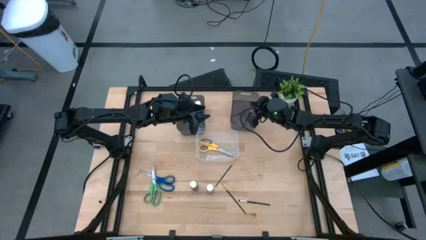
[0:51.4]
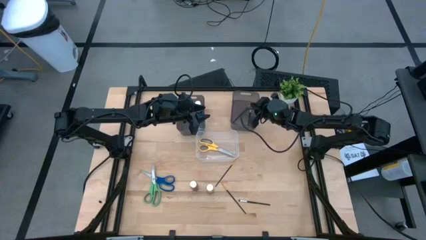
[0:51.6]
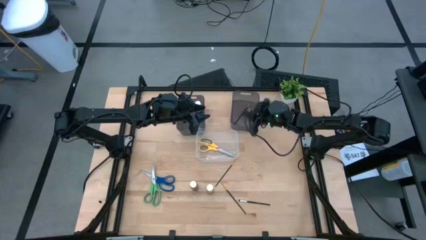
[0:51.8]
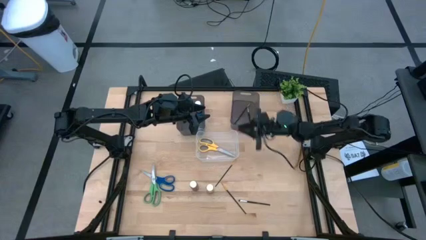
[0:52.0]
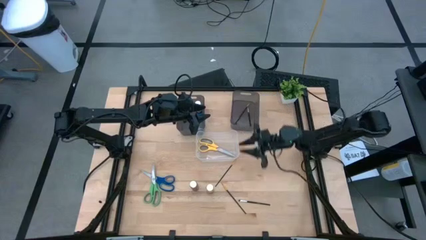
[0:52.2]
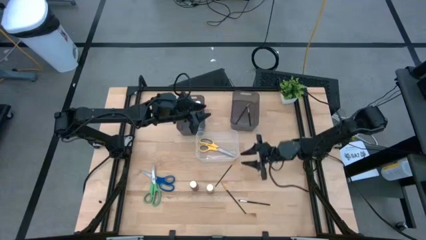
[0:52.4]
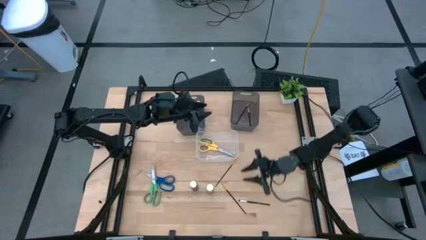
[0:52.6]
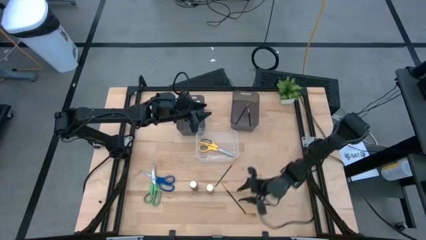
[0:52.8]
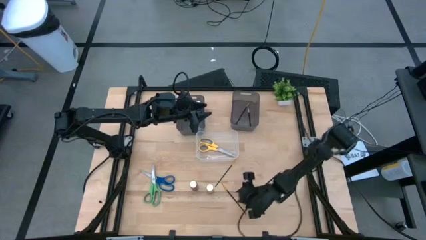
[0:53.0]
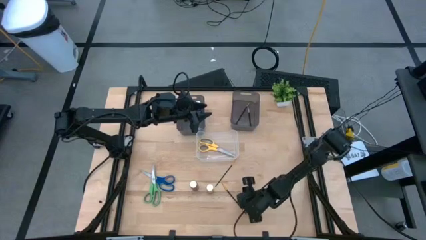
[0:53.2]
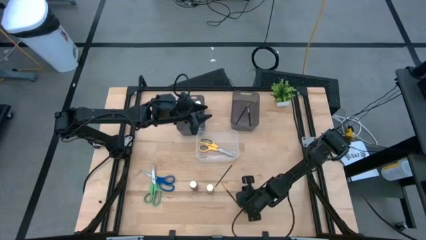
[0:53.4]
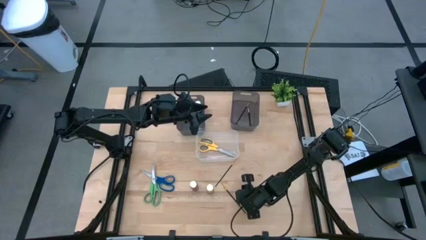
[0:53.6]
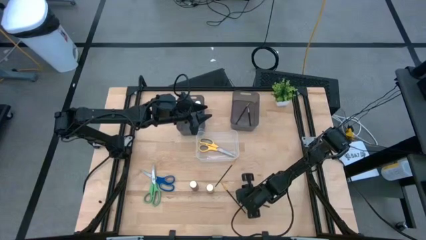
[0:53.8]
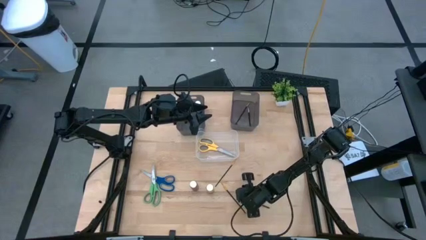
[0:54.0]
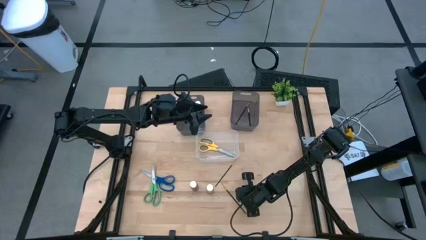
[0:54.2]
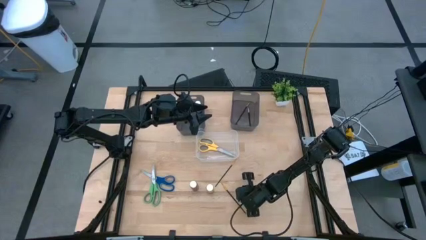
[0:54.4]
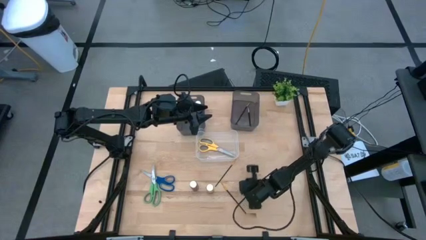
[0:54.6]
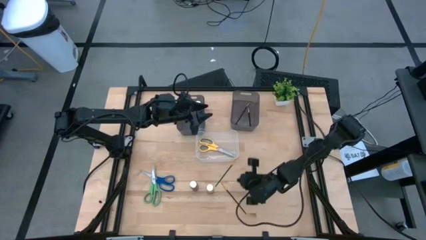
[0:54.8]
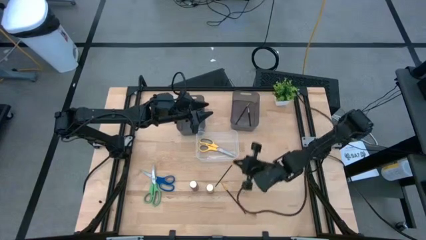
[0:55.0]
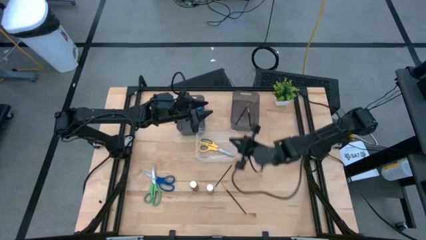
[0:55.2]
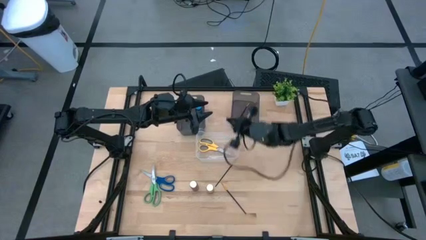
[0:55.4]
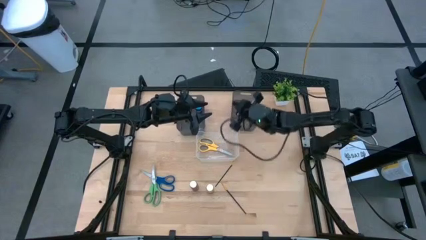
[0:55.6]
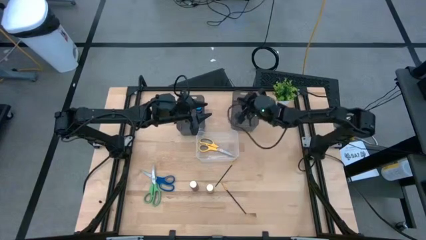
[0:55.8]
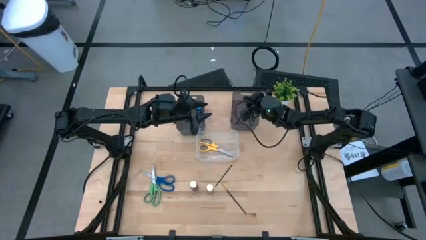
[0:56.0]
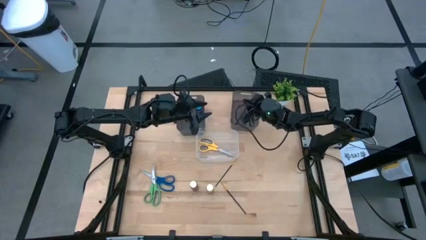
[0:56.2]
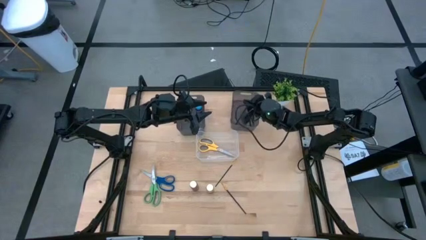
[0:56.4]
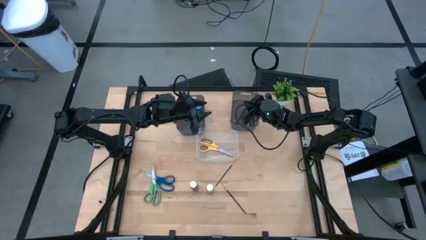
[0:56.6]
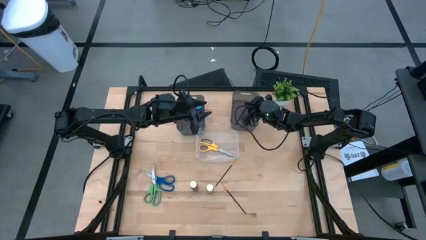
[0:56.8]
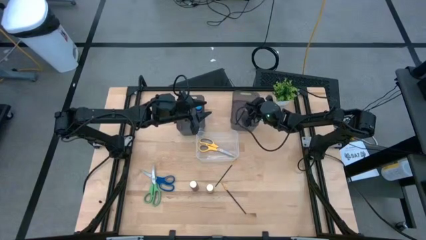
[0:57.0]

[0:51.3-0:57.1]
Task: Pick & Place Paint Supplies
Put the black and silver brush into the right black bin

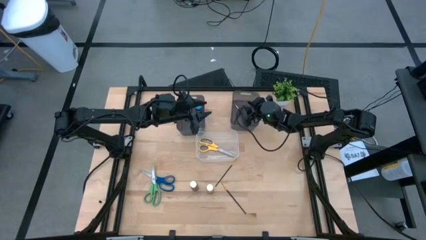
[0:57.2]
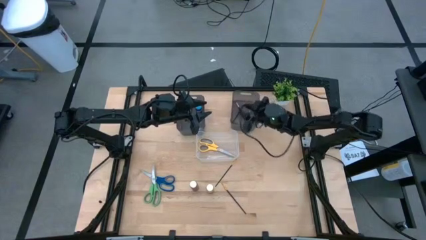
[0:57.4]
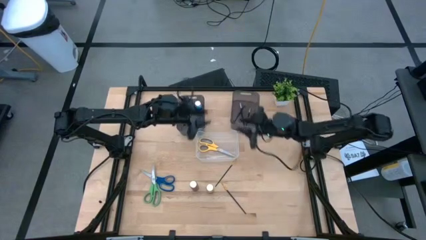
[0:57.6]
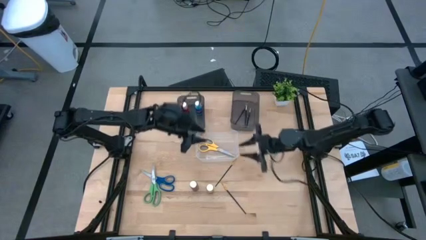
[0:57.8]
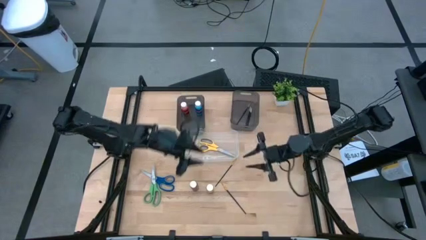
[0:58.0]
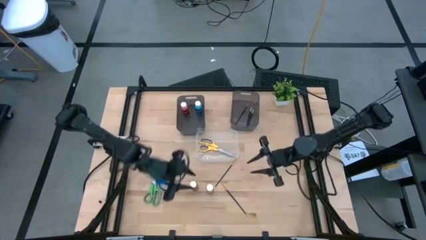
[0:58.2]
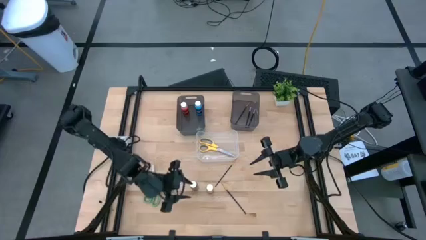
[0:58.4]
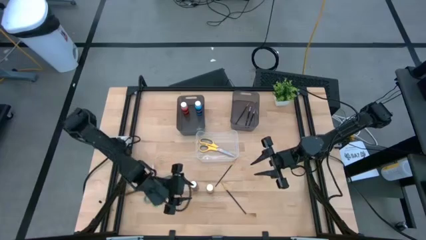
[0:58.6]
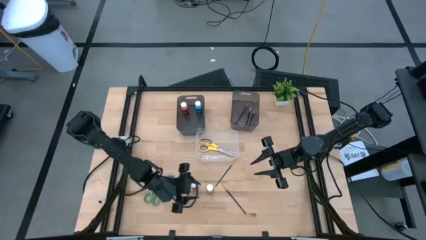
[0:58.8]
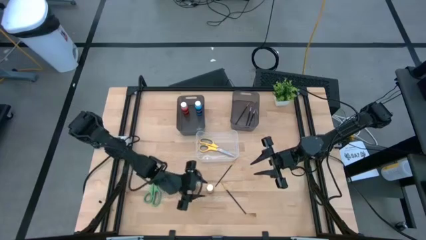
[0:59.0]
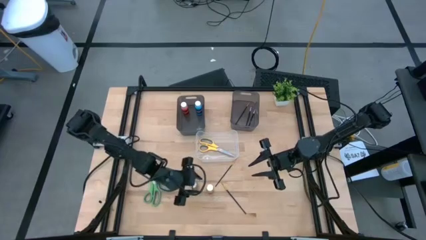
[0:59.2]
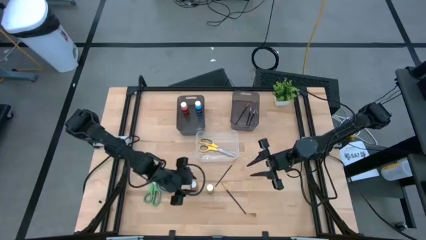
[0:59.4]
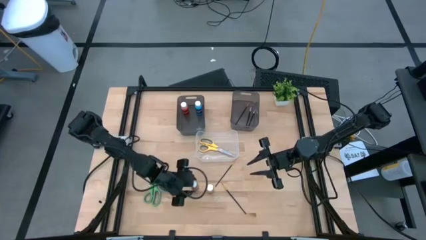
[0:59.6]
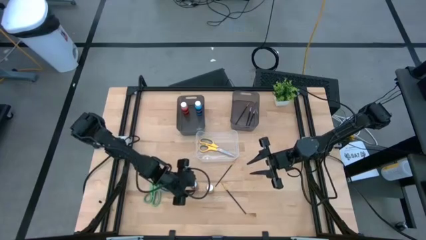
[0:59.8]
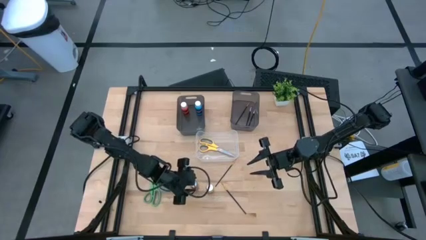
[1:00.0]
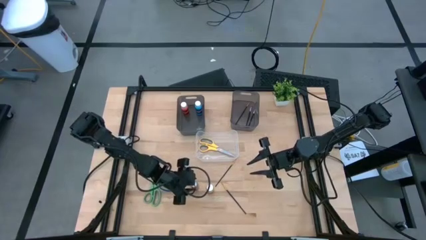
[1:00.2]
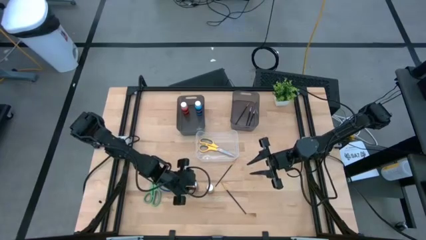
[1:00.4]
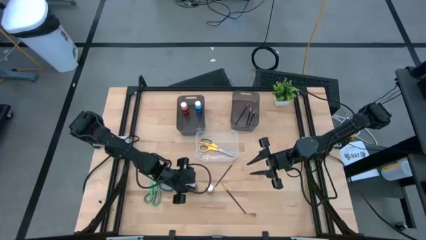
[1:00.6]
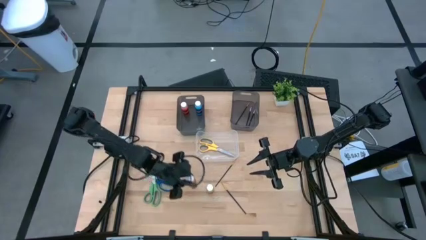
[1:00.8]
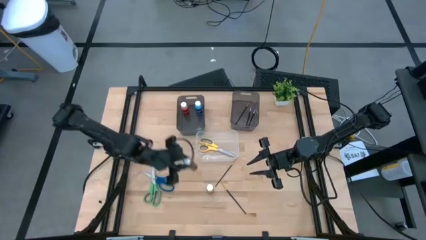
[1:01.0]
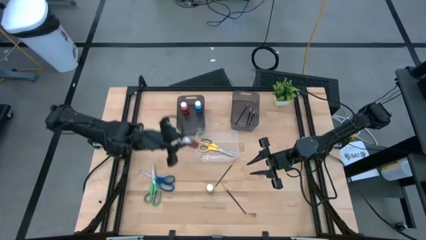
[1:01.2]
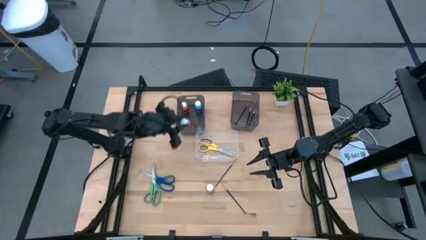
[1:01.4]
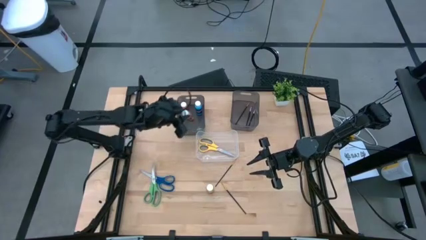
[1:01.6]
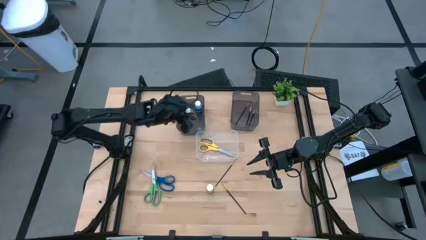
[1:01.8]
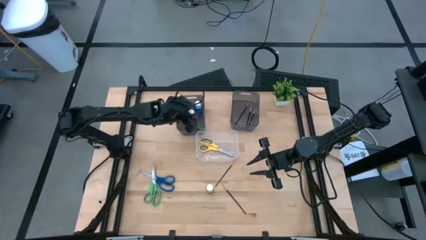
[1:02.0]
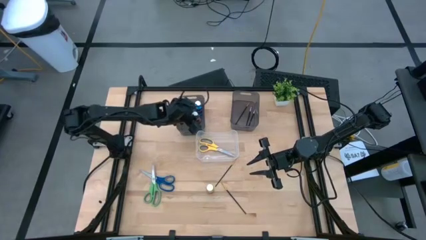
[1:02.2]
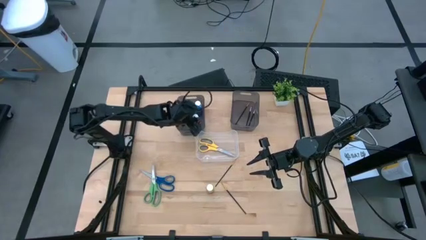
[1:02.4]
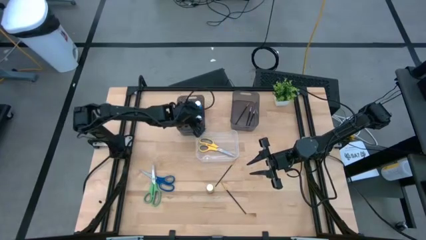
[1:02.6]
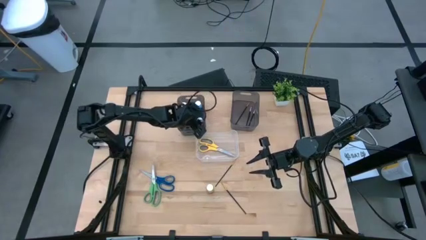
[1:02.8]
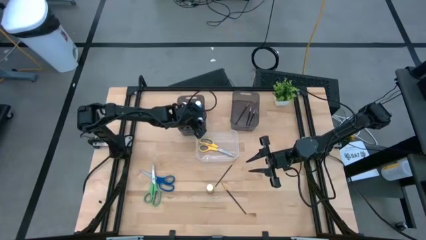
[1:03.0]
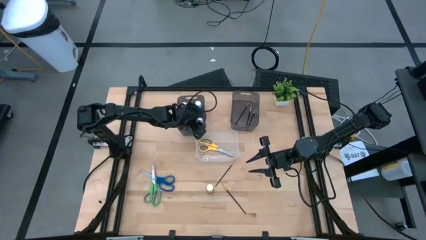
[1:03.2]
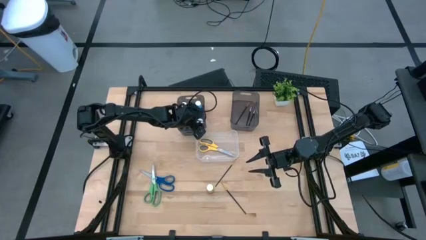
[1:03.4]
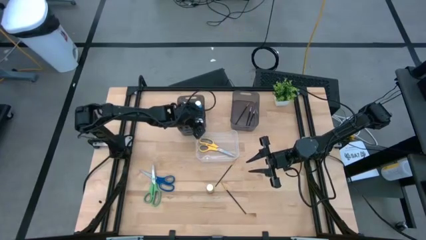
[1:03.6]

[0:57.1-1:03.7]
Put the orange paint bottle into the left black bin

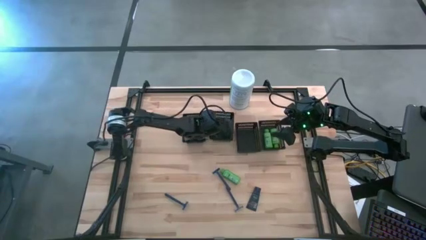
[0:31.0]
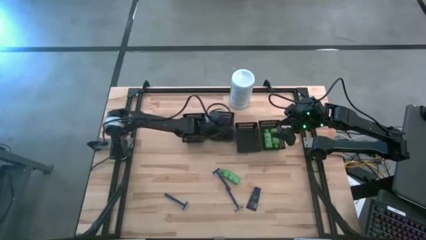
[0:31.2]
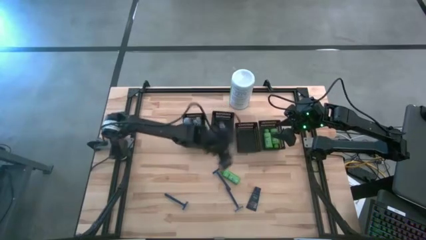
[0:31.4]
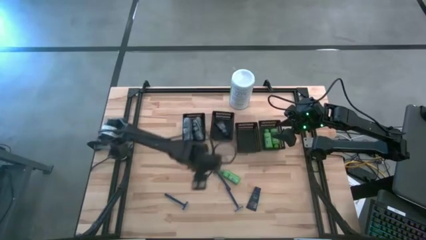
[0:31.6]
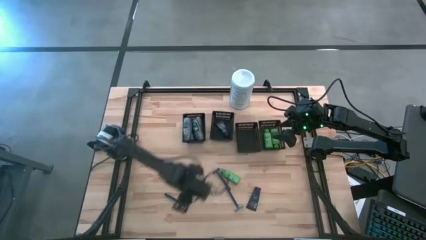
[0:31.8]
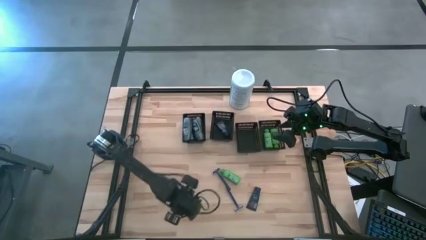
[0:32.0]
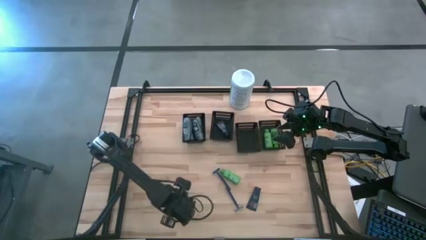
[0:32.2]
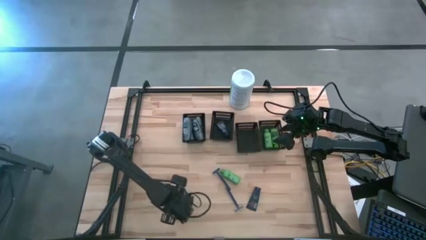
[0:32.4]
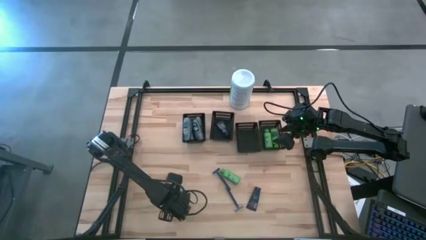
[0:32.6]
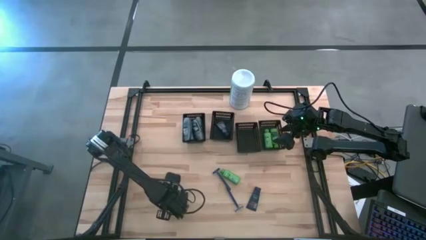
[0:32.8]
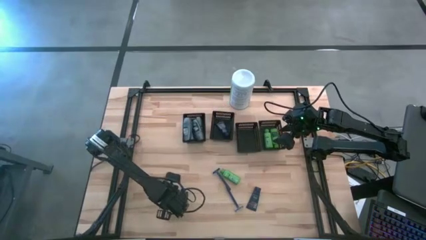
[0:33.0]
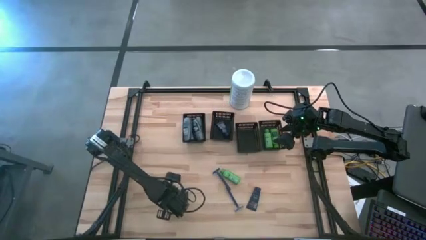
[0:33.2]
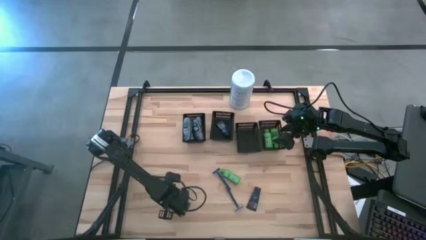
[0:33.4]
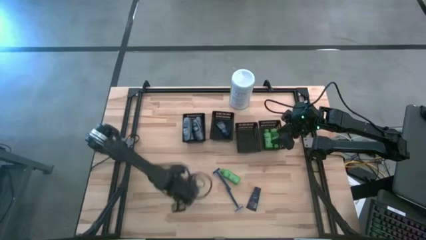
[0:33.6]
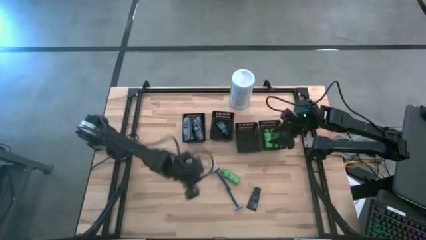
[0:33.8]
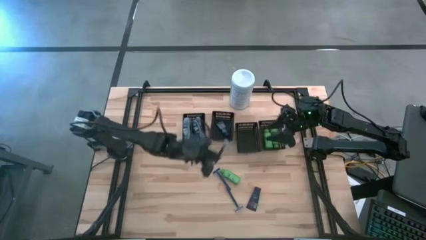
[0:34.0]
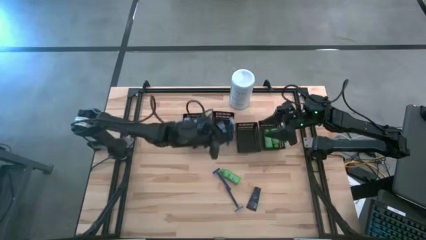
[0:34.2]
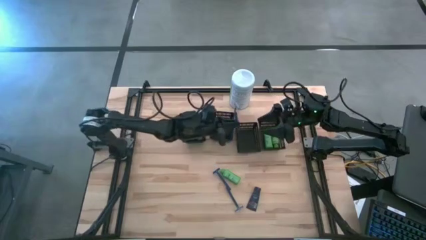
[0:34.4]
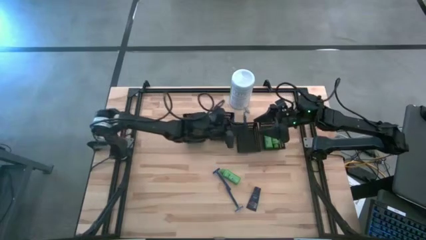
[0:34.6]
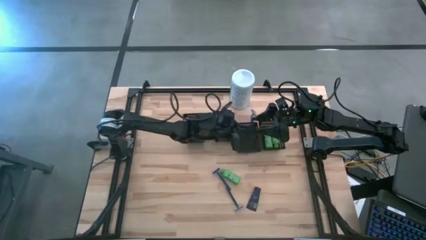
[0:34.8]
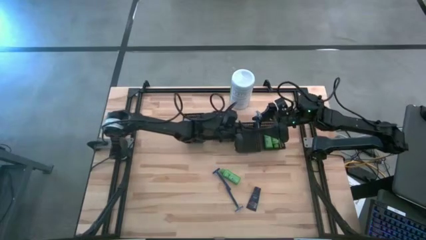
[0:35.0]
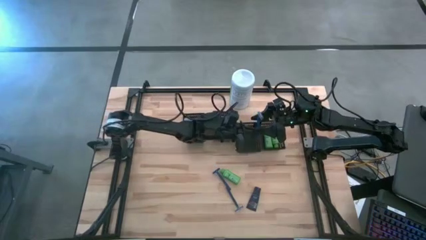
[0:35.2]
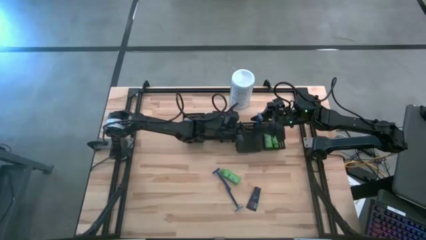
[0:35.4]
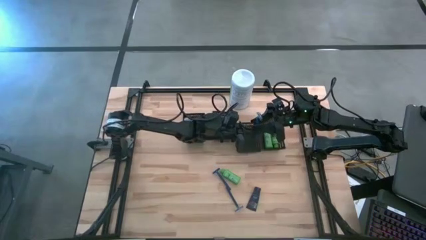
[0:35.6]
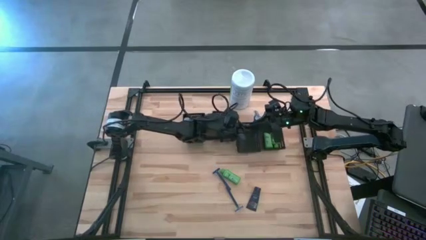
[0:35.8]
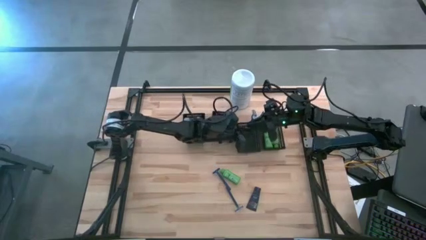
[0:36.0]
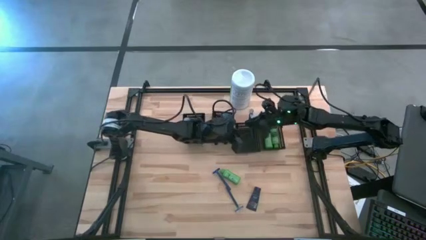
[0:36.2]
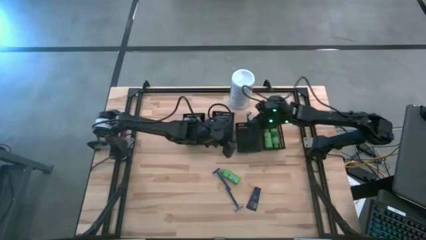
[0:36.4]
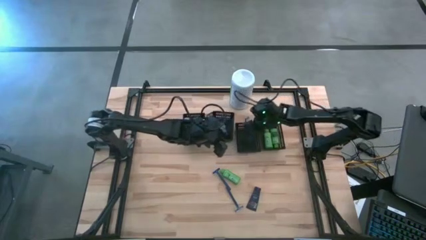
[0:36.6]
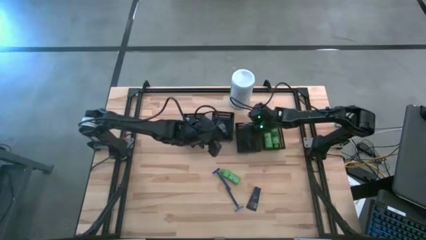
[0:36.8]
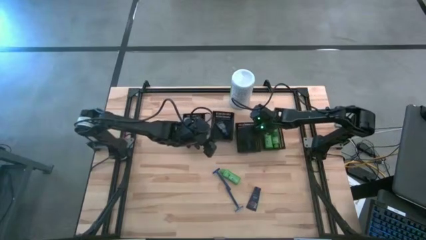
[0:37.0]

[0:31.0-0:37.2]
Task: Pick & Place Travel size toiletries
Put the blue razor into the middle right black bin
